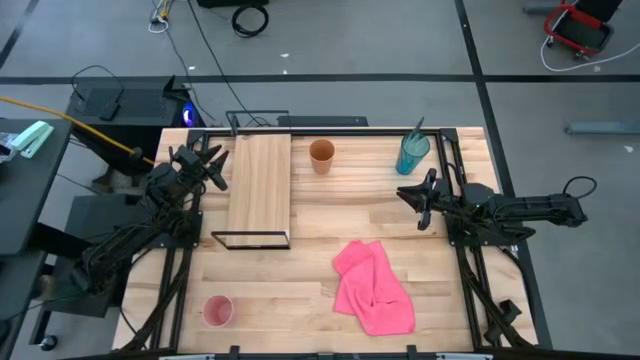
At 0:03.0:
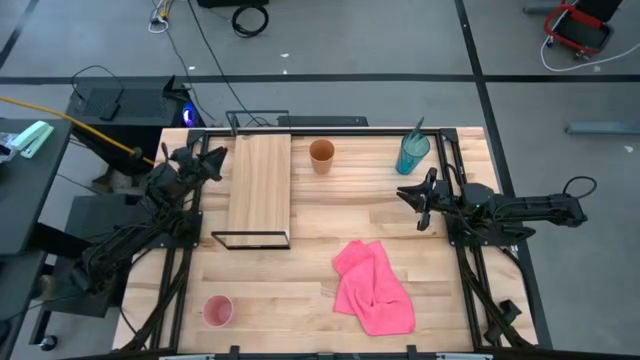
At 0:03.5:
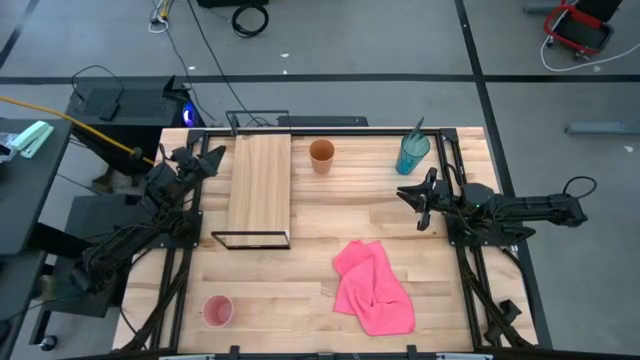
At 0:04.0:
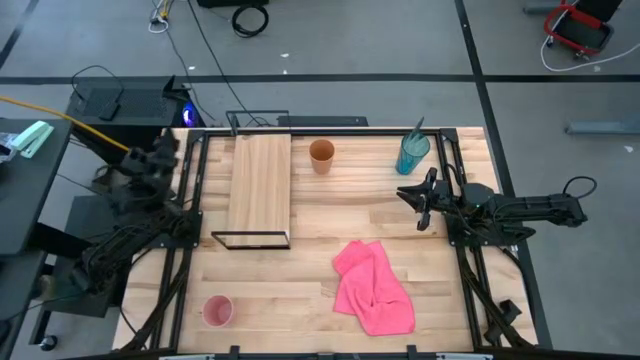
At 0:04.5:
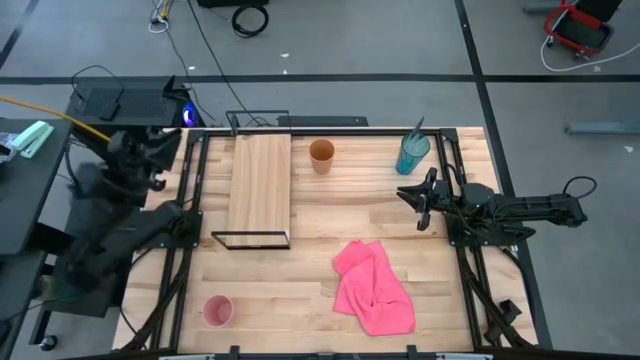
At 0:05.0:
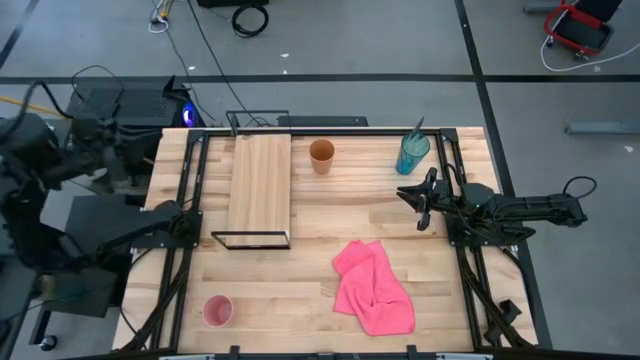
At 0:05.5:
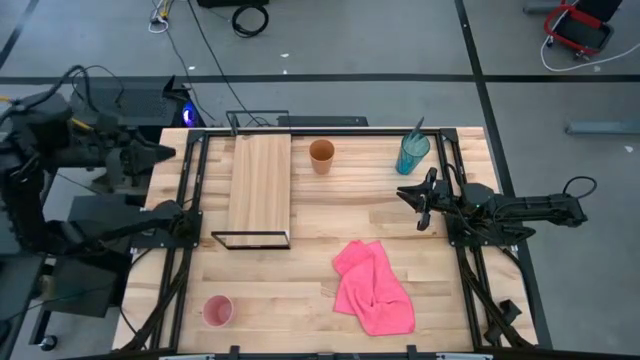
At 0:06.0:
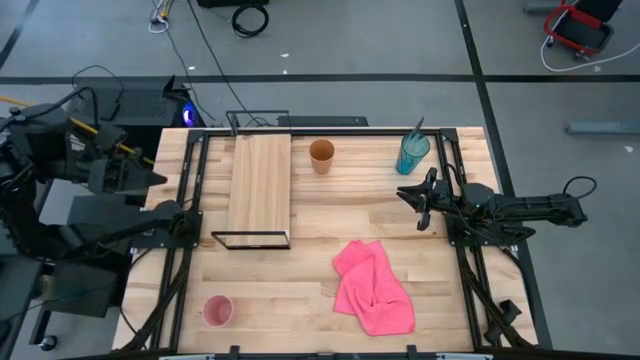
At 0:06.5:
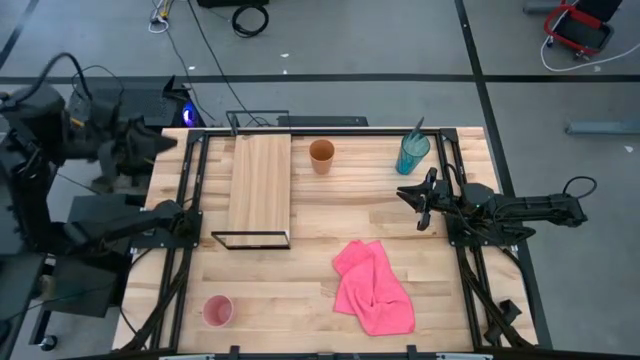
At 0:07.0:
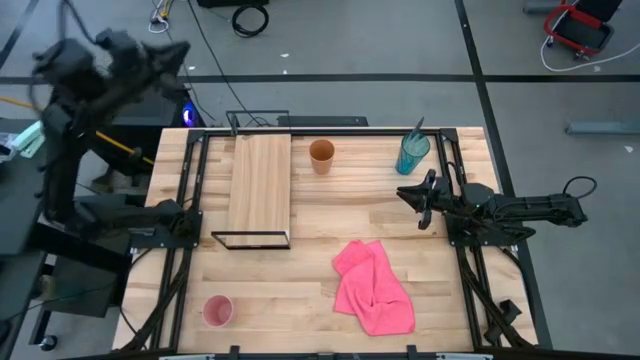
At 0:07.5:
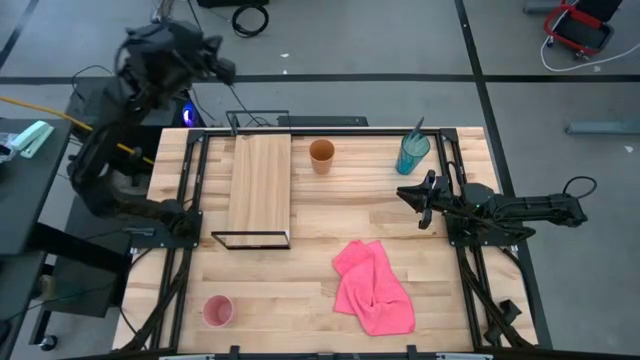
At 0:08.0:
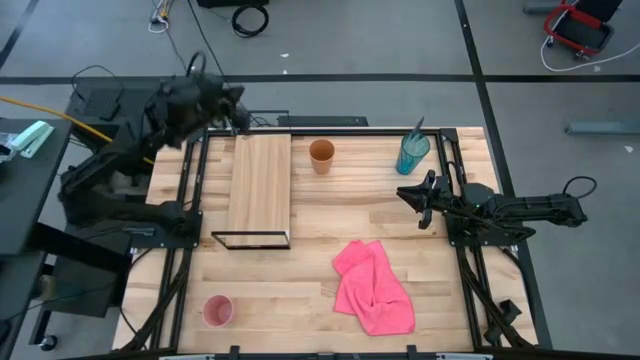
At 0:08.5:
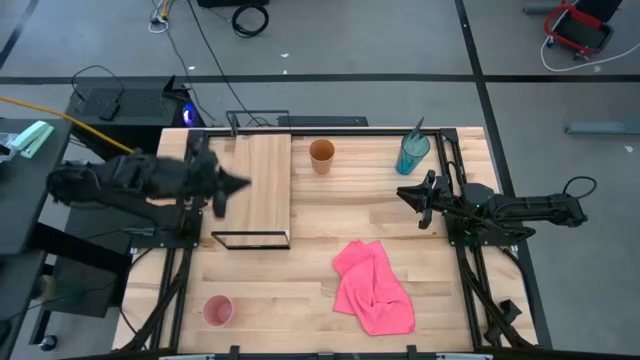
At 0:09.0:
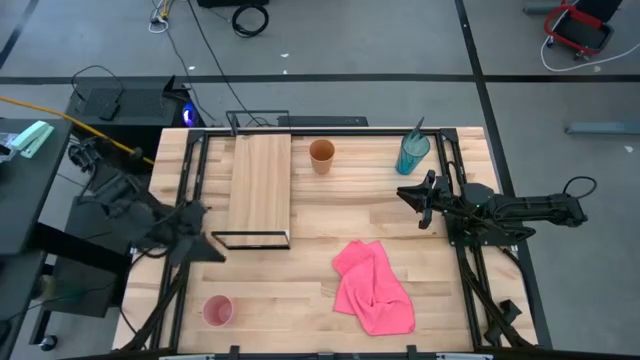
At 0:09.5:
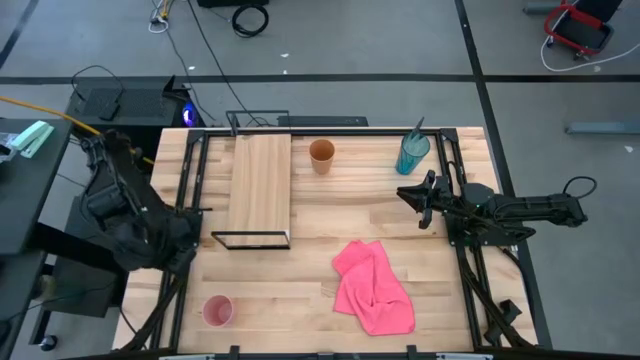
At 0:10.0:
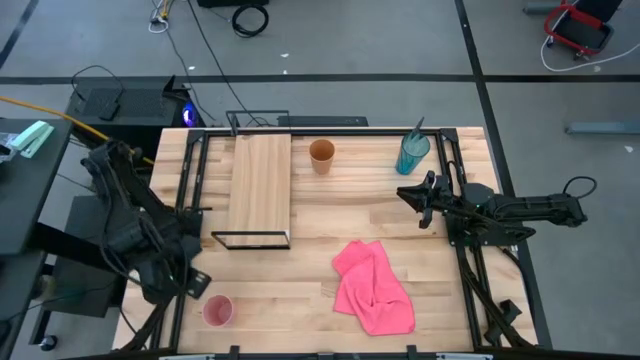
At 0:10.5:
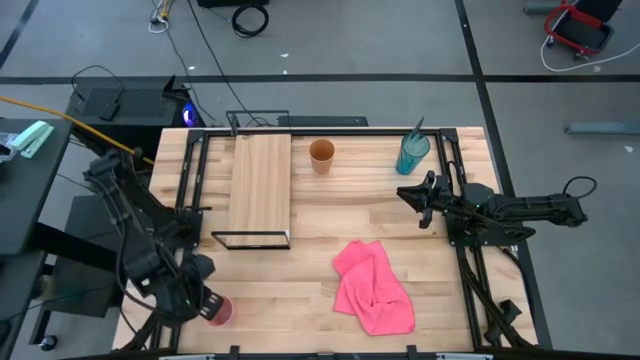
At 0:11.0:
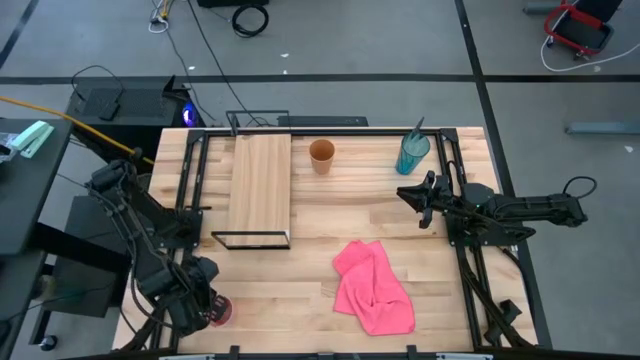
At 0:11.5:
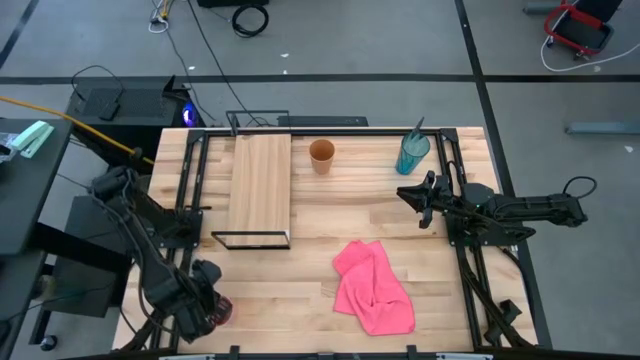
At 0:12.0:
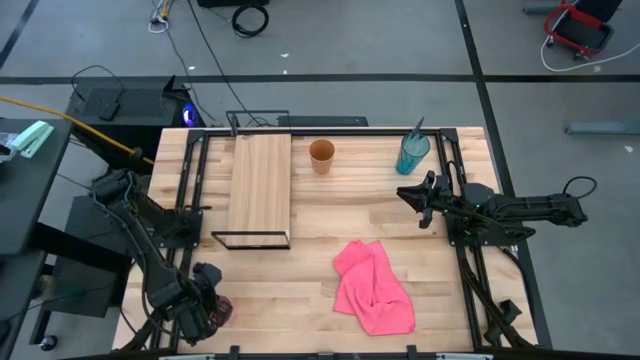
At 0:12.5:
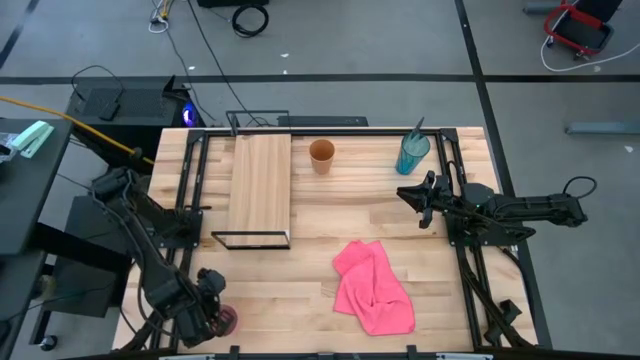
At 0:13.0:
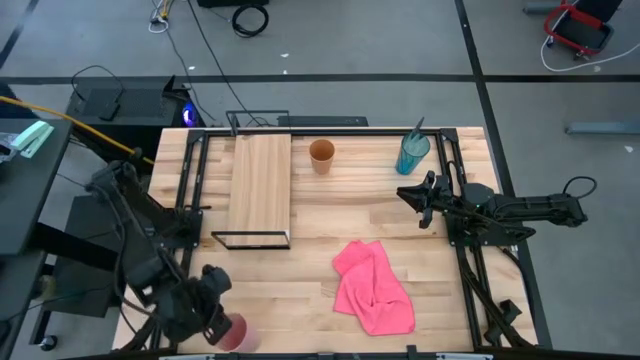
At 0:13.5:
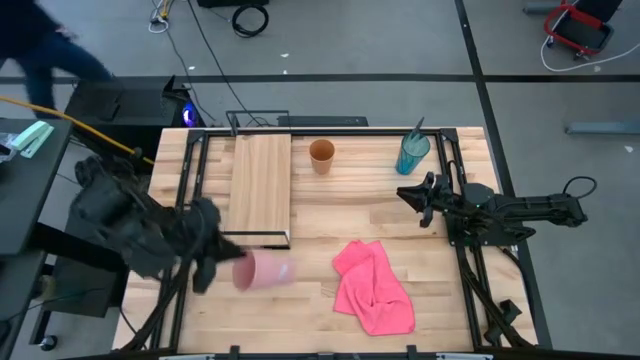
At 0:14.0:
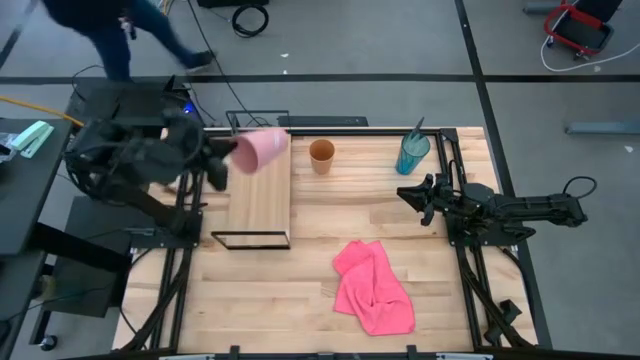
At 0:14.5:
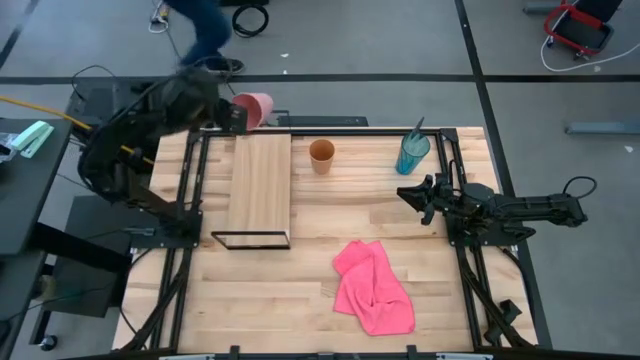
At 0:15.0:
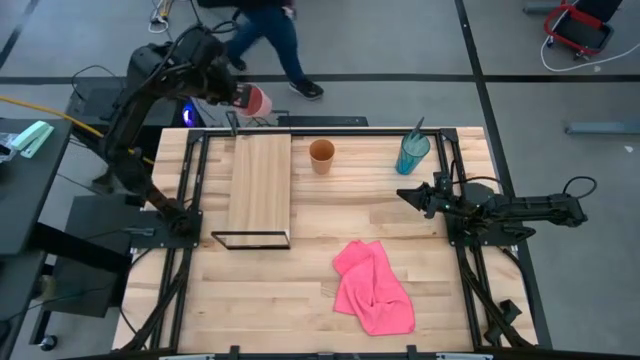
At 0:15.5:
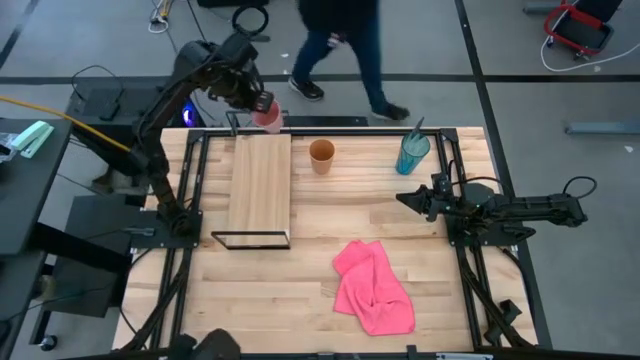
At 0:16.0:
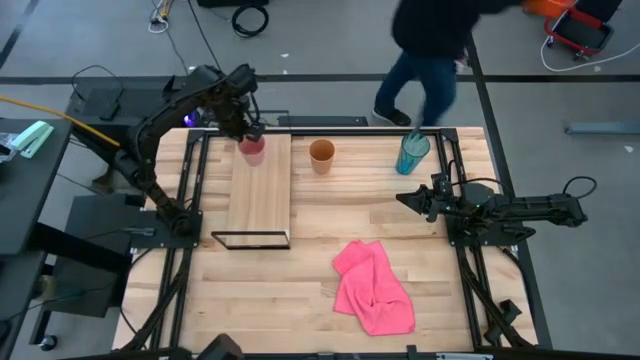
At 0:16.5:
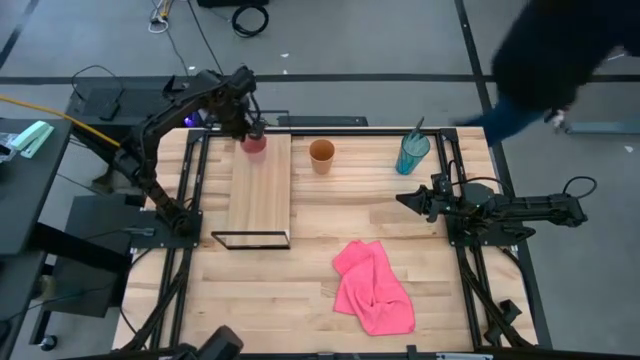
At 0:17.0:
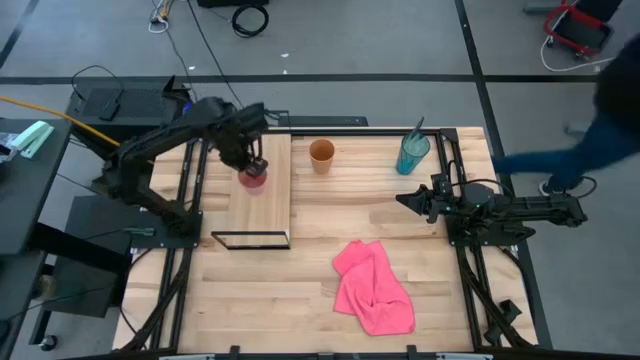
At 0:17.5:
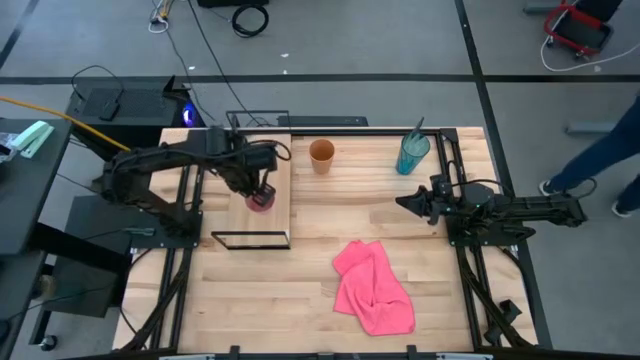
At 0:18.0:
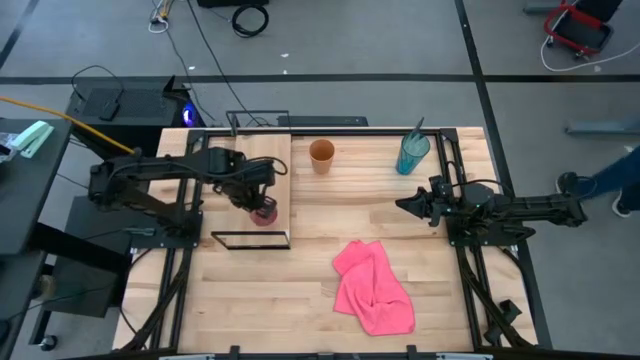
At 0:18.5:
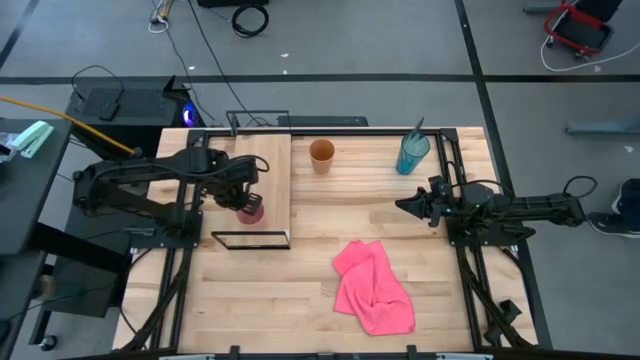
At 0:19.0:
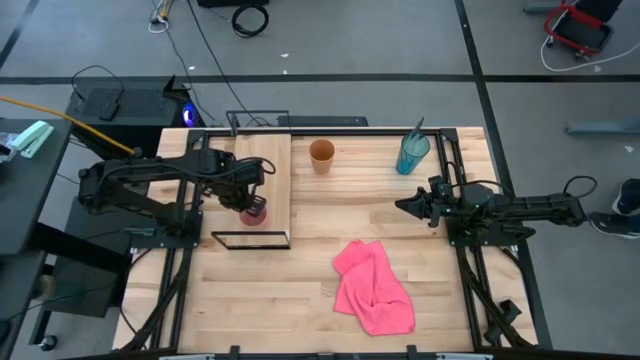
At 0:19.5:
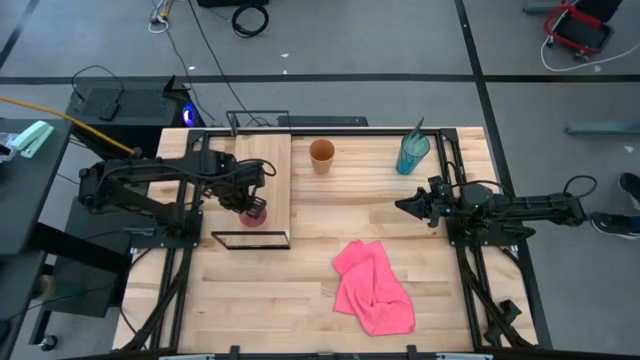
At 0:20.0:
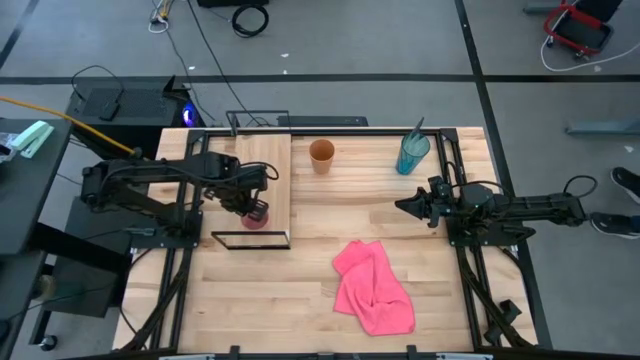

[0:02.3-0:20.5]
Task: Stack small to large cups/mugs on shelf
Put the pink cup on the shelf

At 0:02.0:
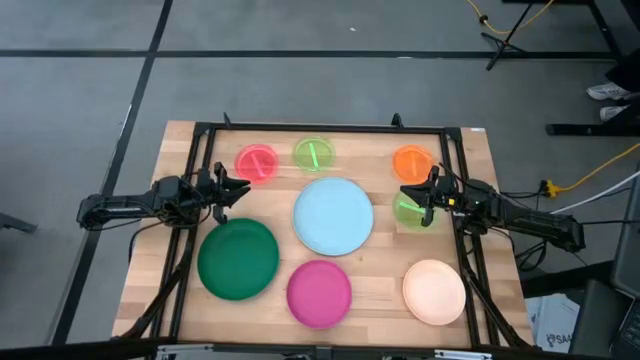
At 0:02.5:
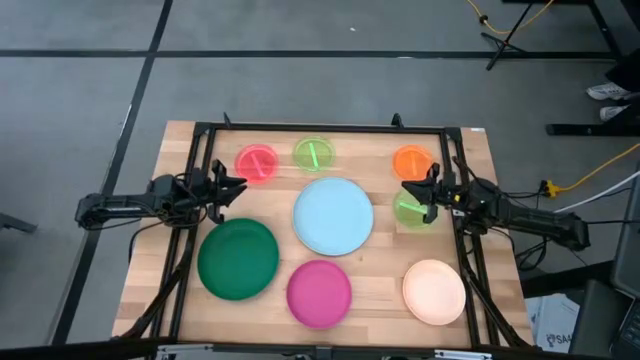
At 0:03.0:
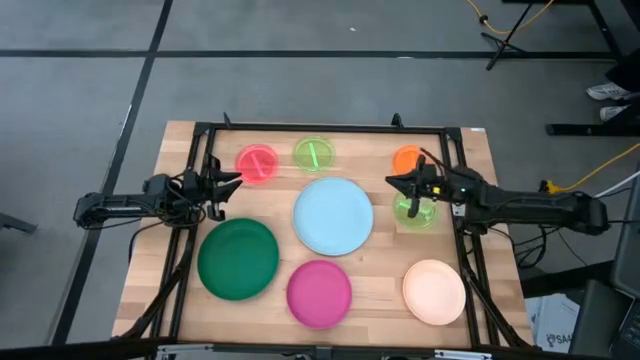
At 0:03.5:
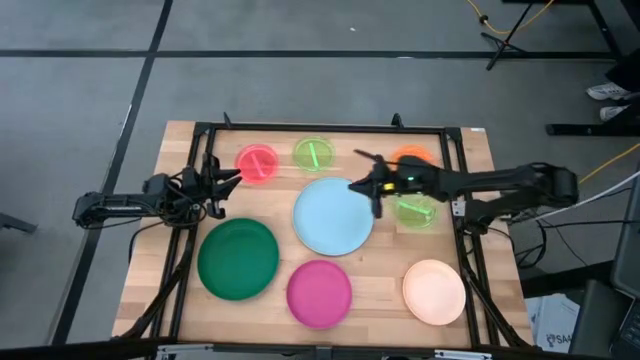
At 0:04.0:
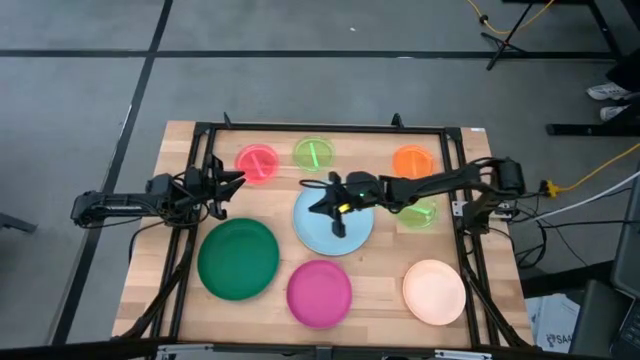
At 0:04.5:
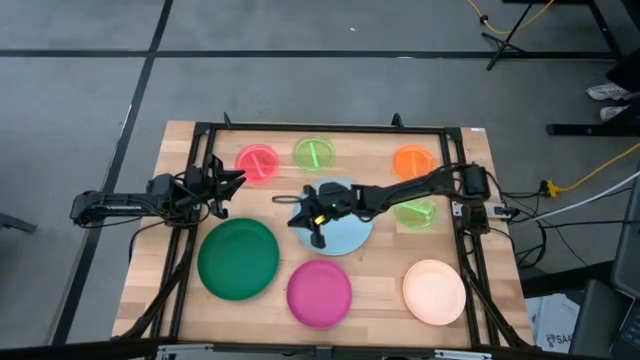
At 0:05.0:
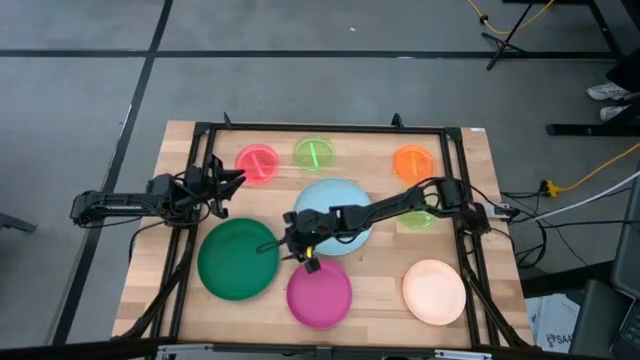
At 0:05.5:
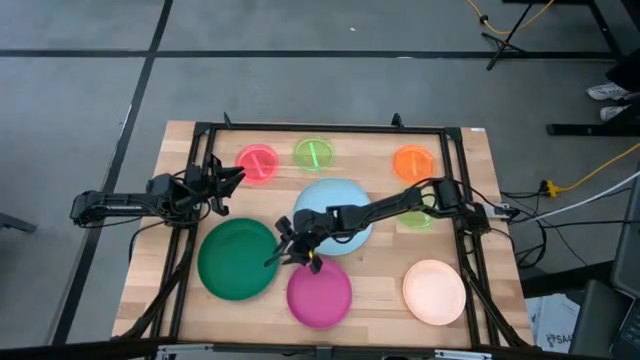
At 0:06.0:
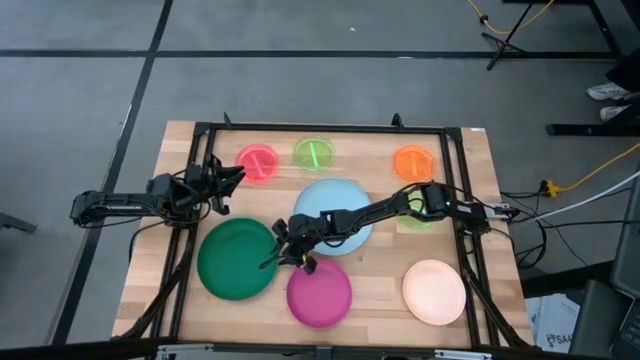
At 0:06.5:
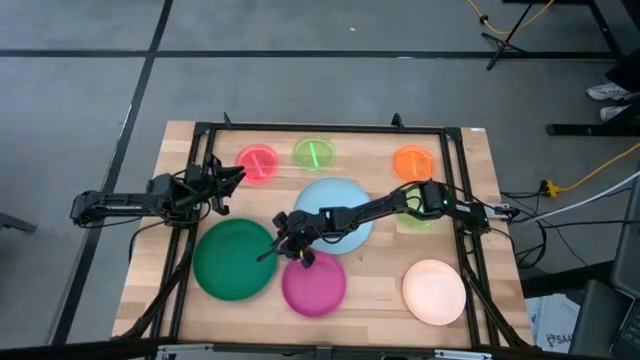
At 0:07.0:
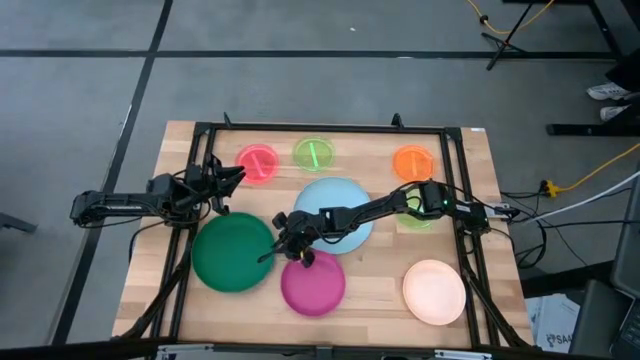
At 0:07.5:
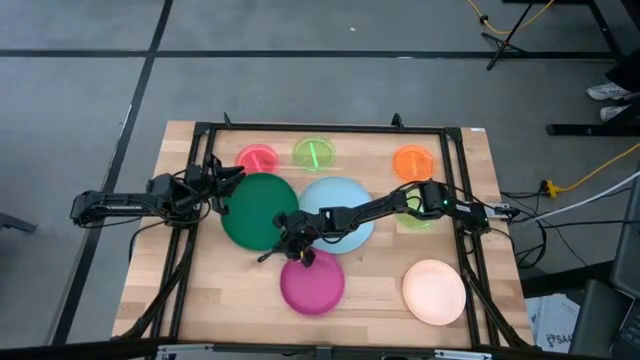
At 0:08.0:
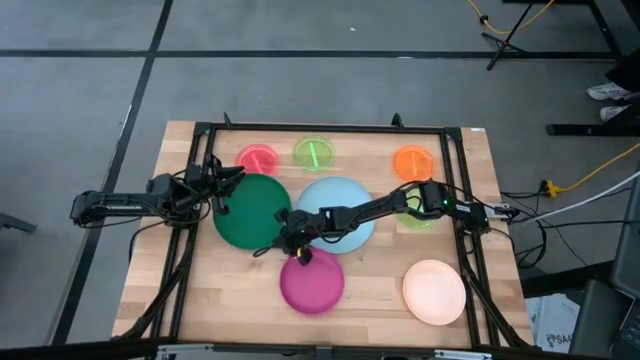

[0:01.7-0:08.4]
Task: Stack plastic plates
Stack the green plate on the blue plate
